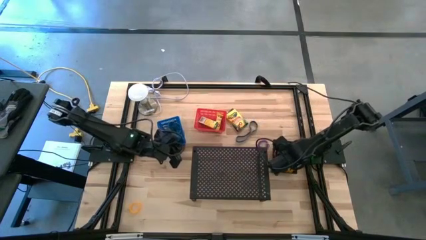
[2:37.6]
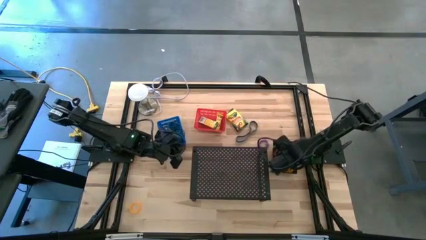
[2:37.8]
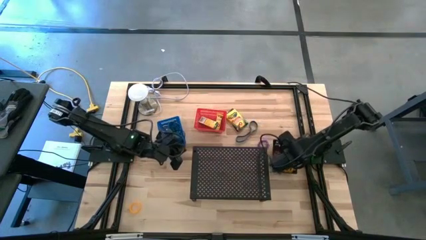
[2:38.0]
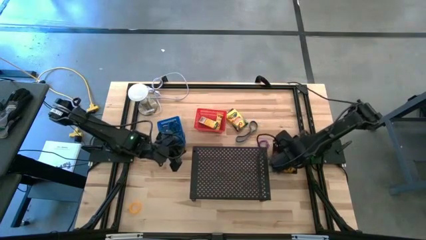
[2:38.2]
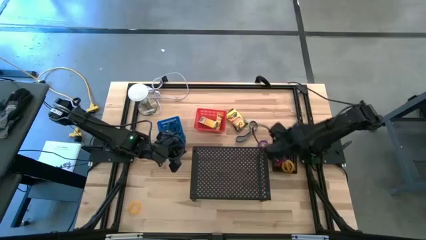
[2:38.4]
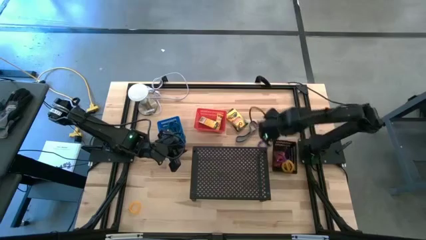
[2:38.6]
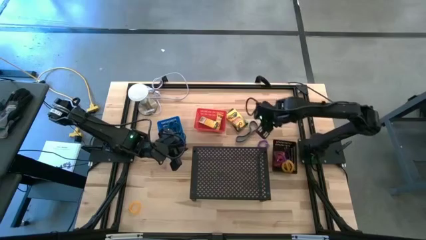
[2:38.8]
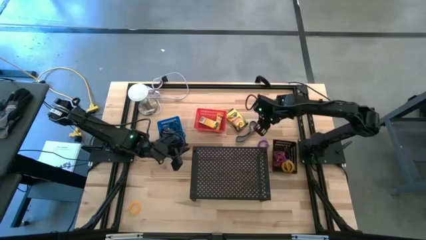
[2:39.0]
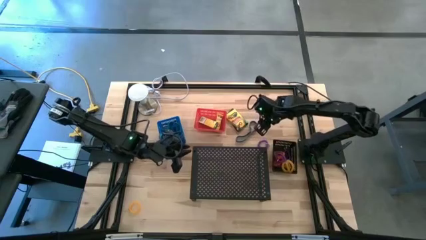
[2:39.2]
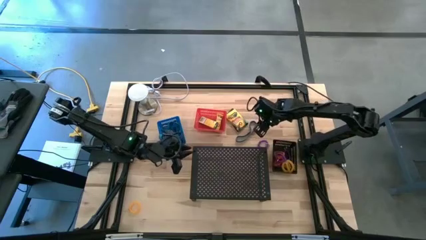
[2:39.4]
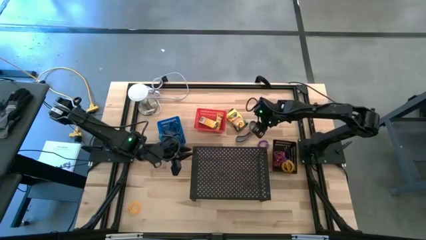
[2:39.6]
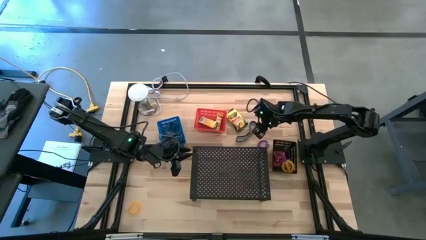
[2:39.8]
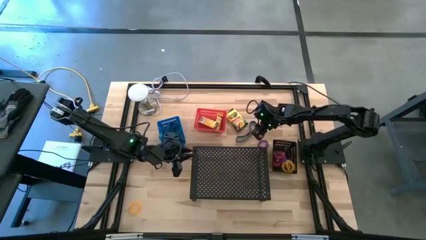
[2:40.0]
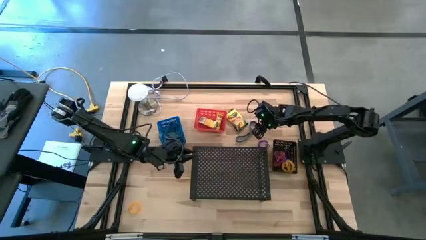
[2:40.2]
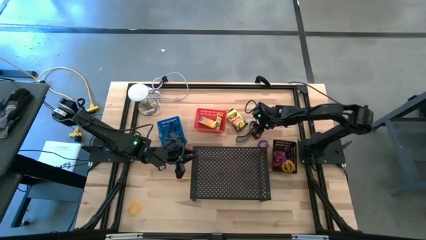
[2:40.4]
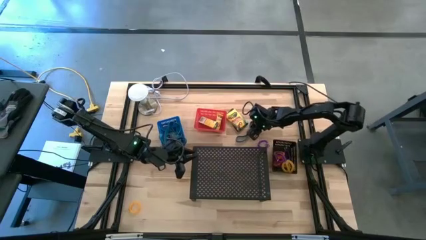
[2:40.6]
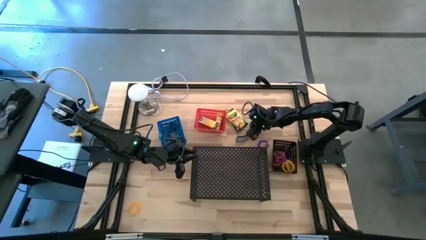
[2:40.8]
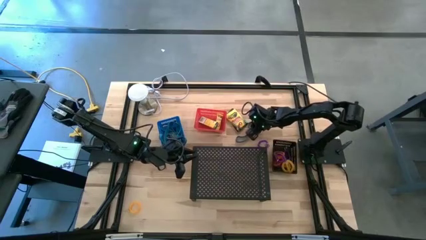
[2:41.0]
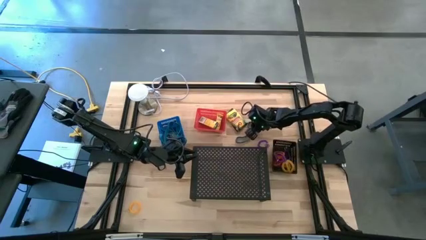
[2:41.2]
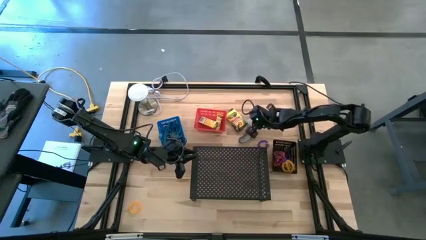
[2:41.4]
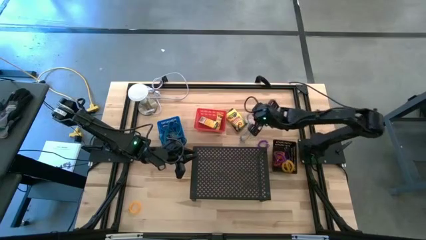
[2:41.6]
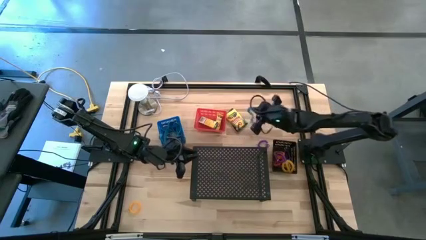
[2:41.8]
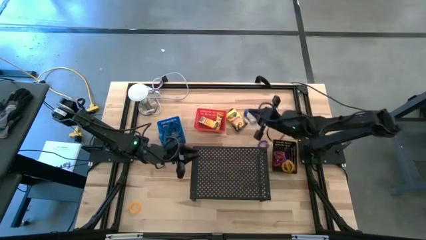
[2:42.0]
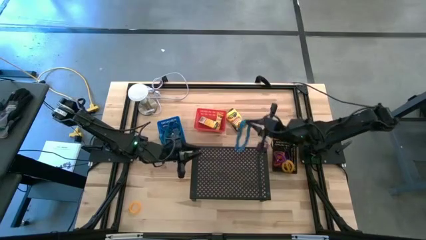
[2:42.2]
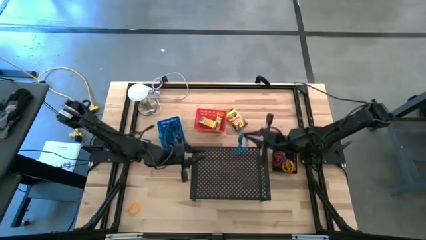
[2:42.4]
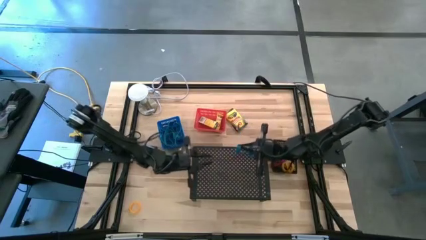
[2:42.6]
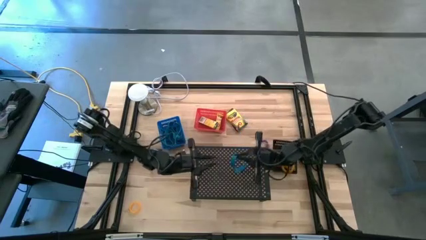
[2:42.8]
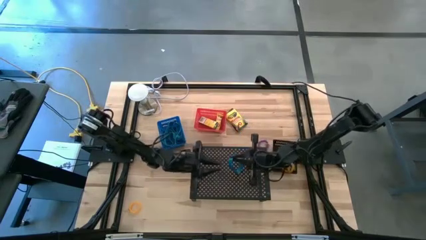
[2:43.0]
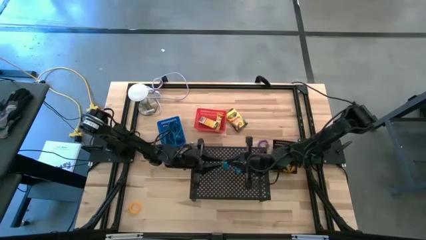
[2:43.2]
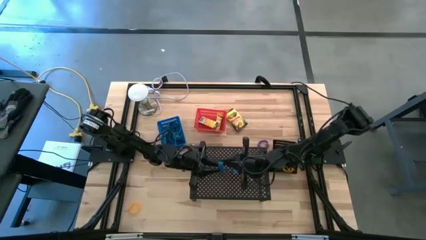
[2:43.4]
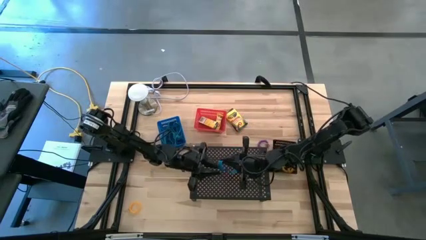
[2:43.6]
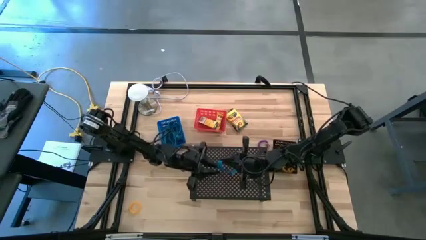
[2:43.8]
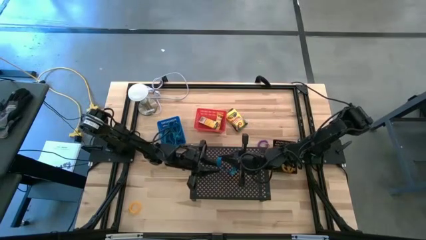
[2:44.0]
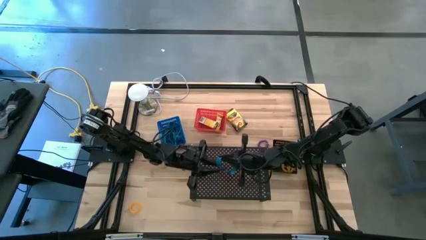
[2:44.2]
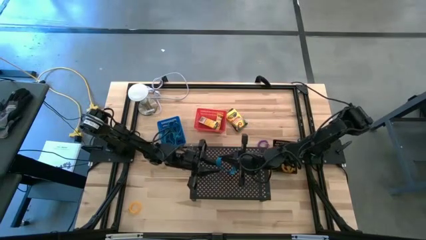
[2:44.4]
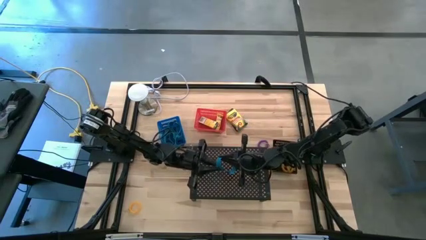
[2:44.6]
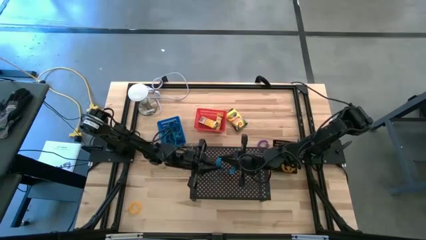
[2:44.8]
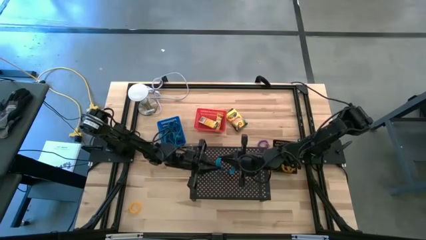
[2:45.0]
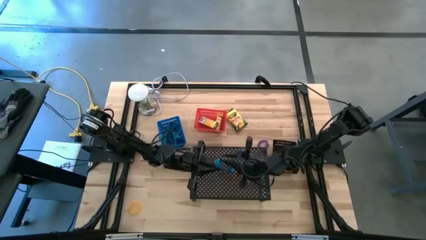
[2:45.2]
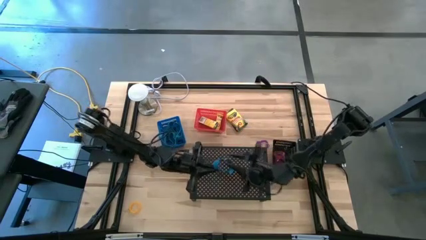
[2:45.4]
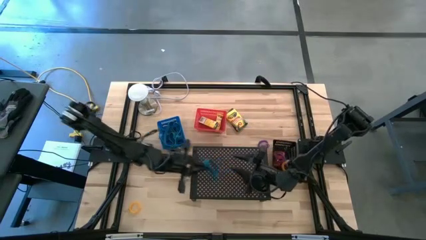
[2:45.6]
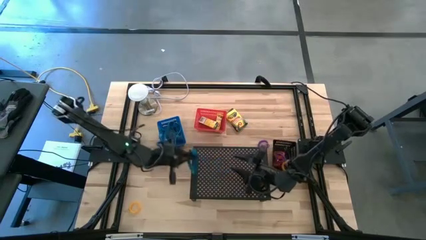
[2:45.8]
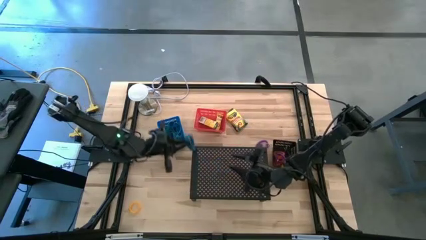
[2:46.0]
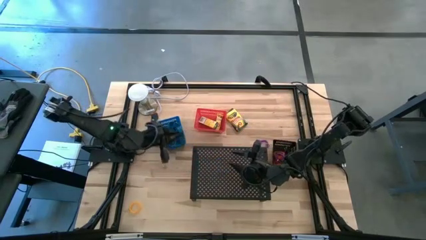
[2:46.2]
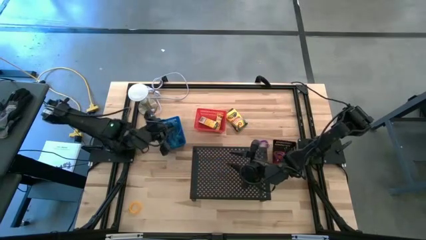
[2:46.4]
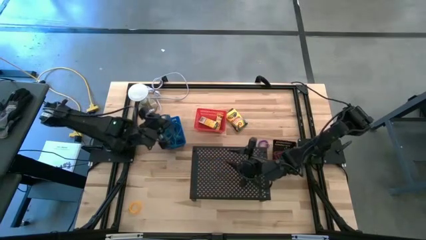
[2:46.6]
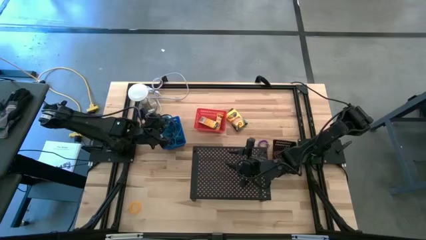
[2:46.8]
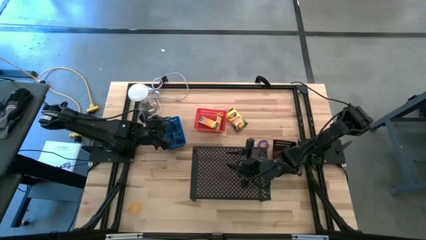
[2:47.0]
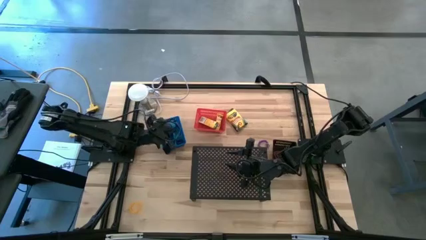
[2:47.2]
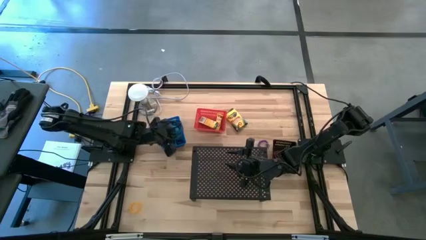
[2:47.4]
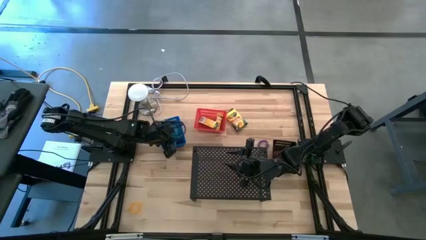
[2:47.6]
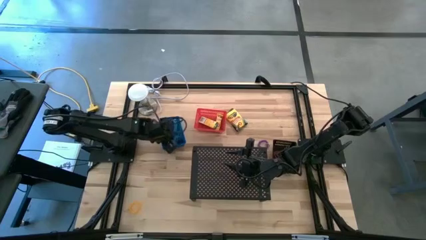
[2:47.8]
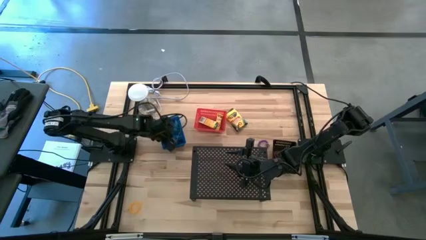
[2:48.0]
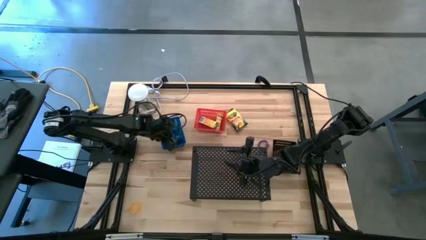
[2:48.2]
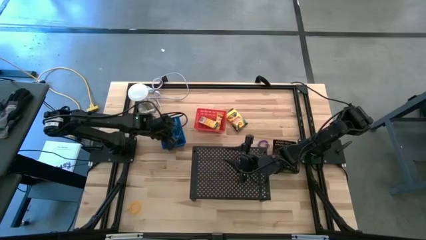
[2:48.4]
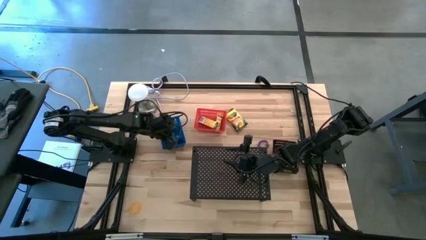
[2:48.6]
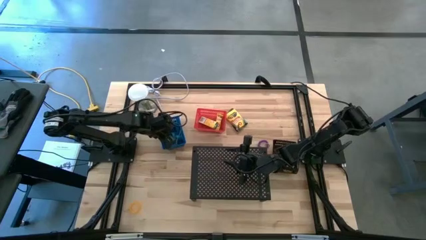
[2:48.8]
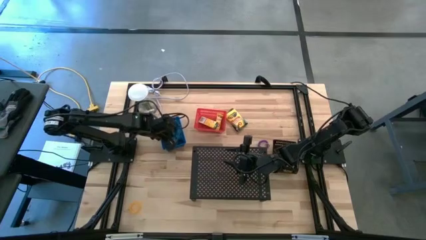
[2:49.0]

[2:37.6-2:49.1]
Task: Pick & Place Office Desk Supplies
Put the blue rubber band into the blue bin

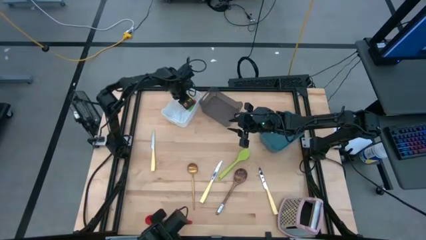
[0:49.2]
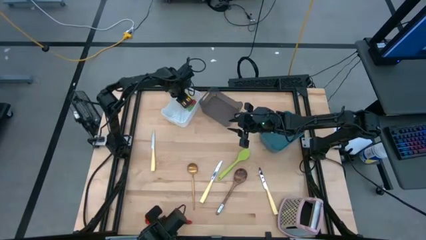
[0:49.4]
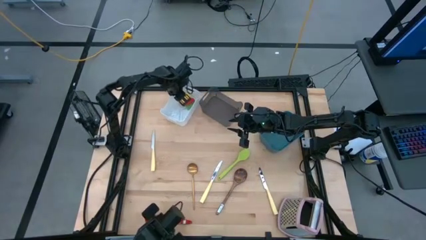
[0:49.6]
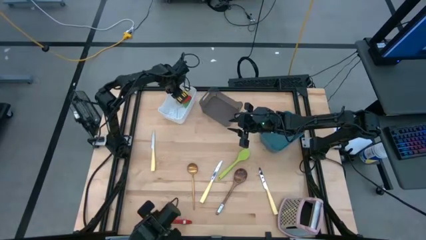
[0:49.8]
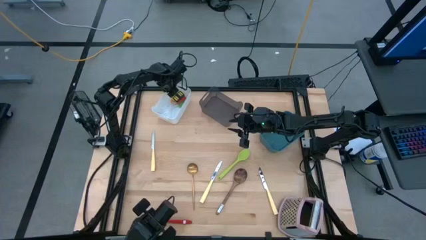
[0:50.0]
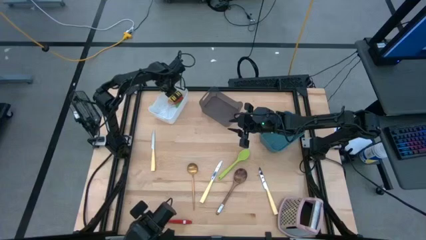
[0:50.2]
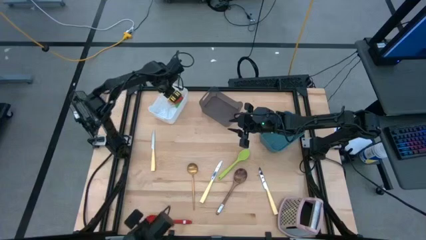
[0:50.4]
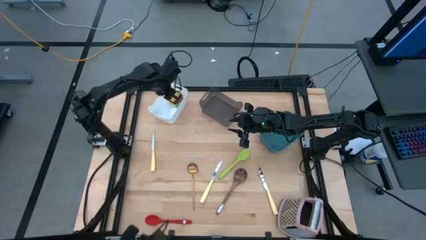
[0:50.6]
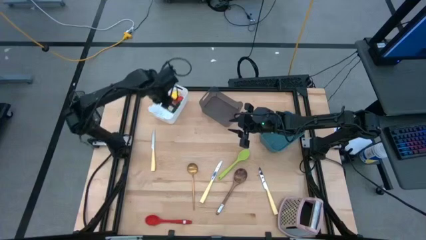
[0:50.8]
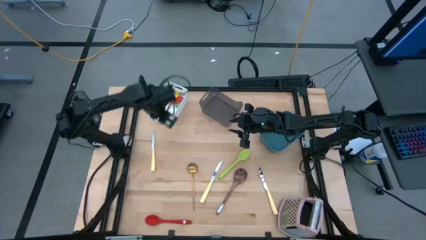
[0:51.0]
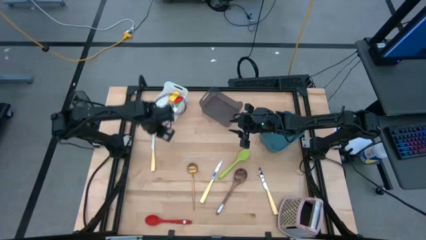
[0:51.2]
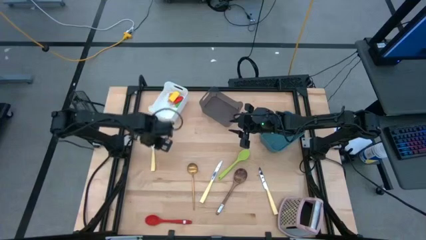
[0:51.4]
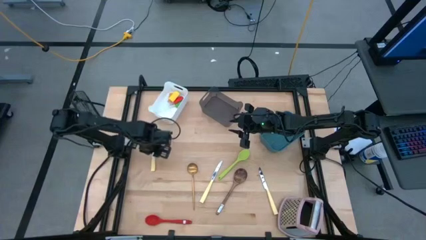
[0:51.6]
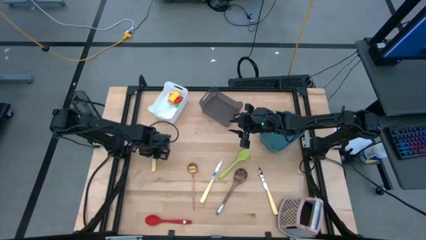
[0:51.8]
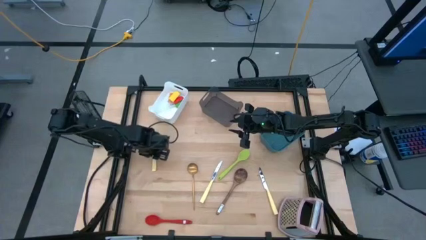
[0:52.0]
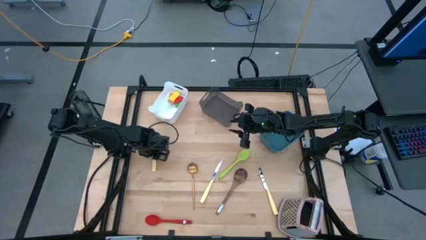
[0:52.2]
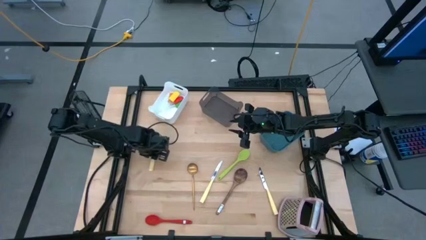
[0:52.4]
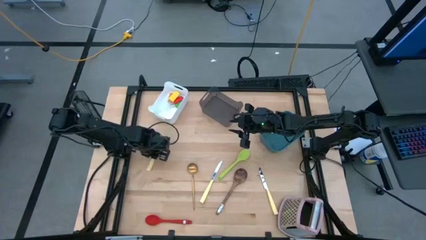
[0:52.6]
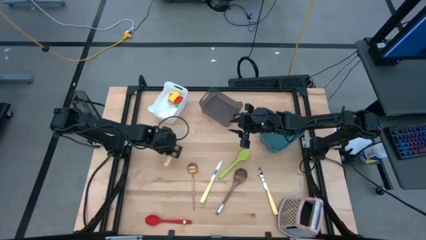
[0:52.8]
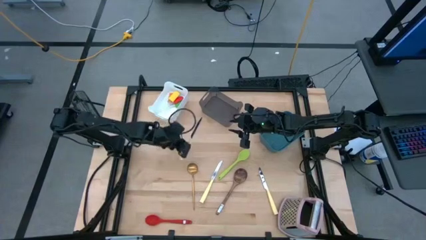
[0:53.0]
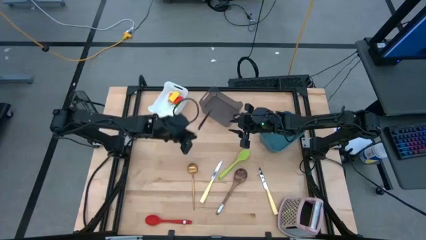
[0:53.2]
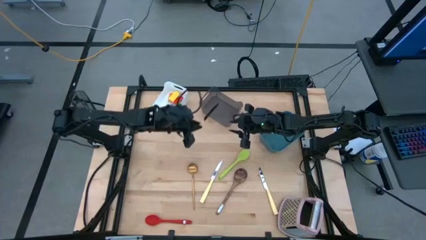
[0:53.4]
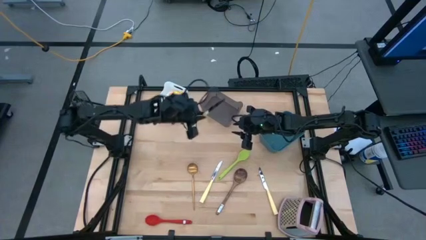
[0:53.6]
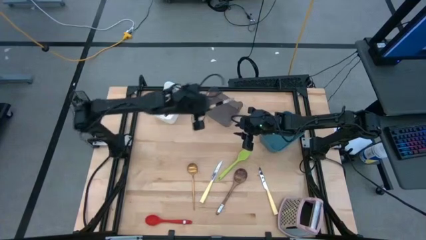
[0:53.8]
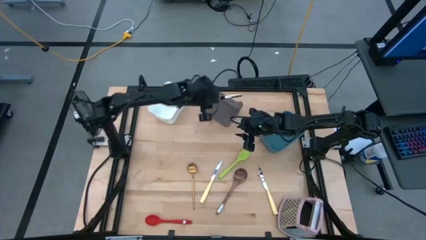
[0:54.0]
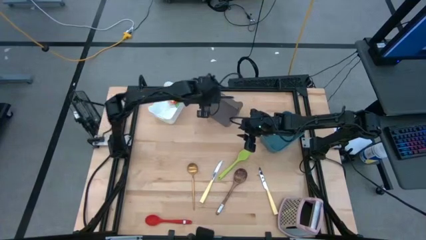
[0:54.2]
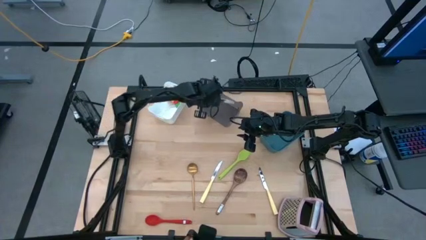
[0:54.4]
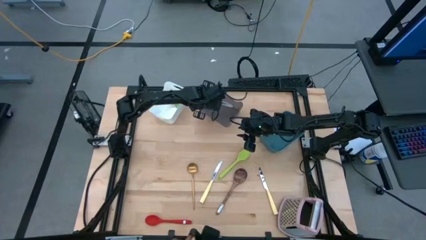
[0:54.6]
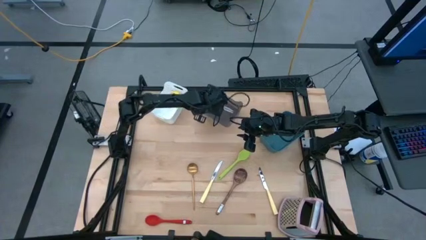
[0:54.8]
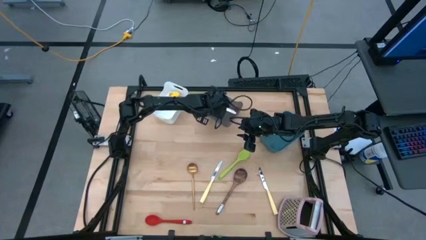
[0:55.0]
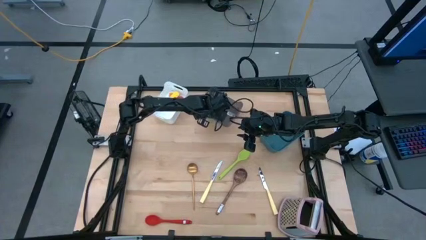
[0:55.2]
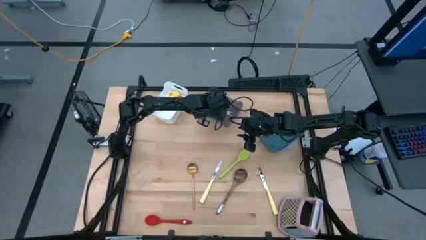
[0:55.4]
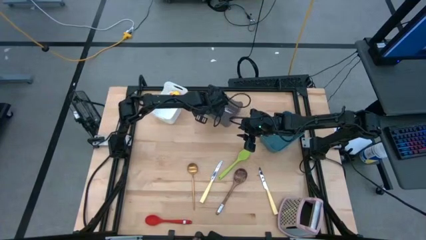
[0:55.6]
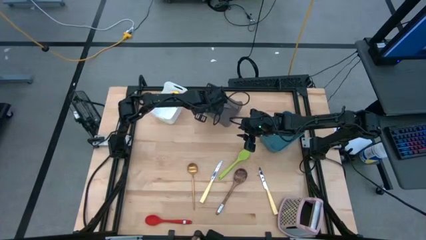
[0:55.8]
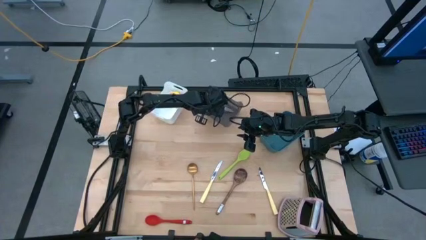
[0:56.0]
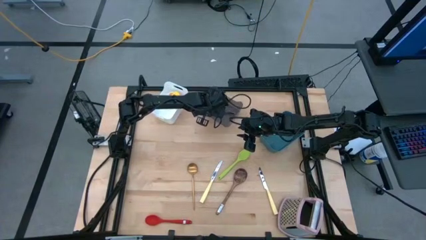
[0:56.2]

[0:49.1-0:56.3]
Task: Pick & Place Kitchen Items
Put the top yellow table knife into the black bin
